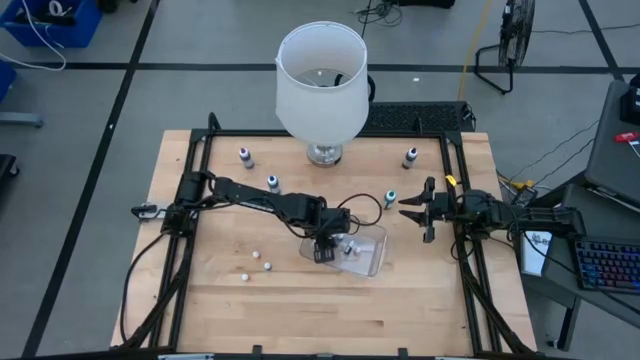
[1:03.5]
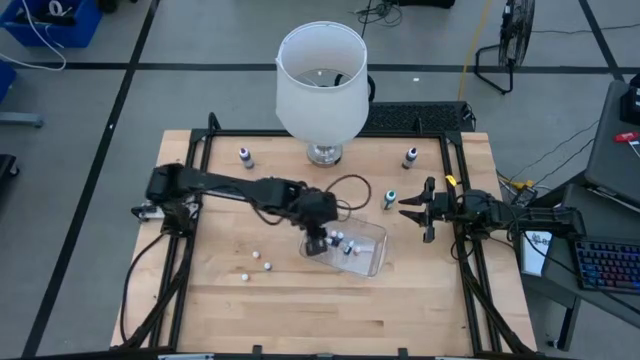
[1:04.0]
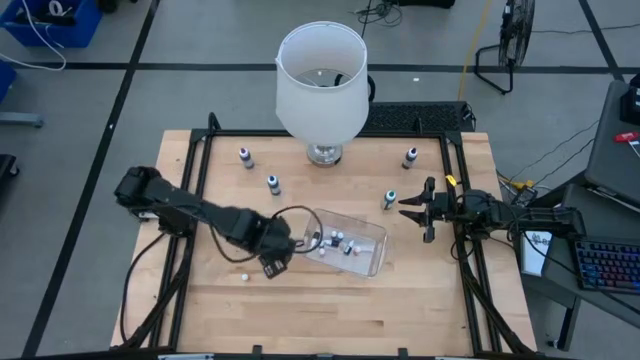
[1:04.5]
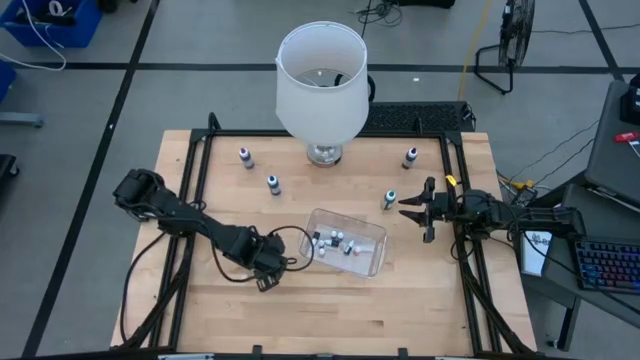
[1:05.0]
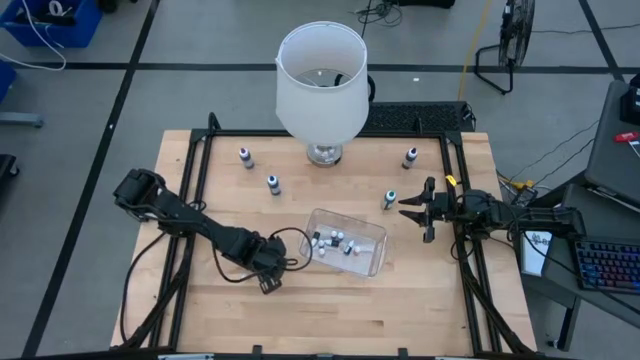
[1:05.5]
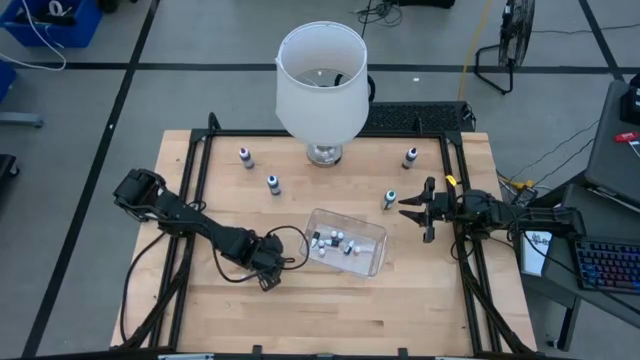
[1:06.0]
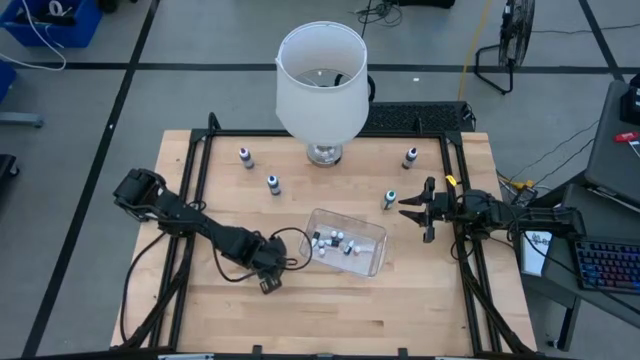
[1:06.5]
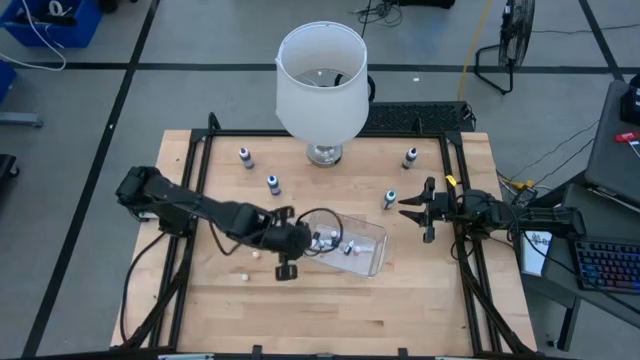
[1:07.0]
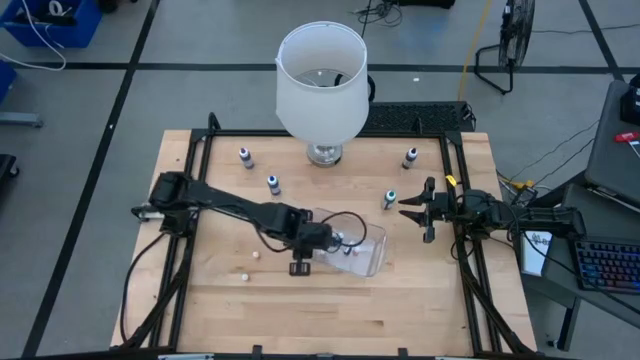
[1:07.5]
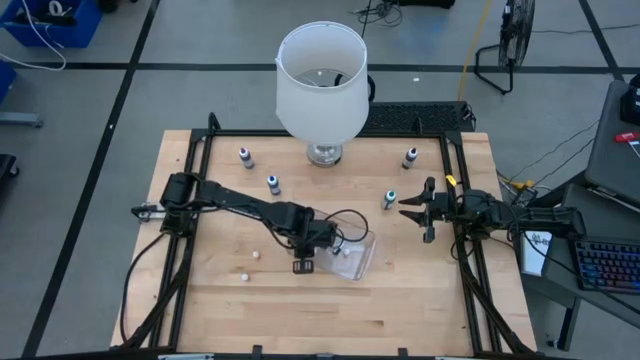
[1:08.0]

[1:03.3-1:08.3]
Task: Pick & Place food coloring
Put the red food coloring bottle into the transparent bin

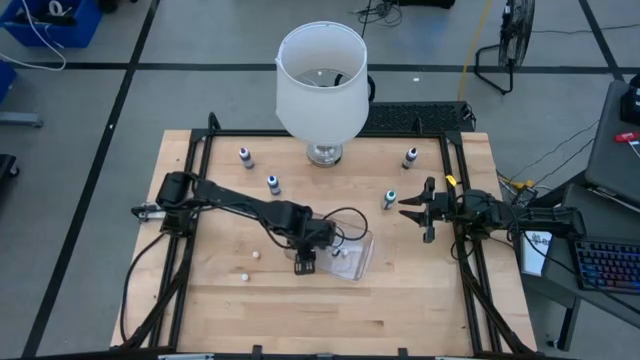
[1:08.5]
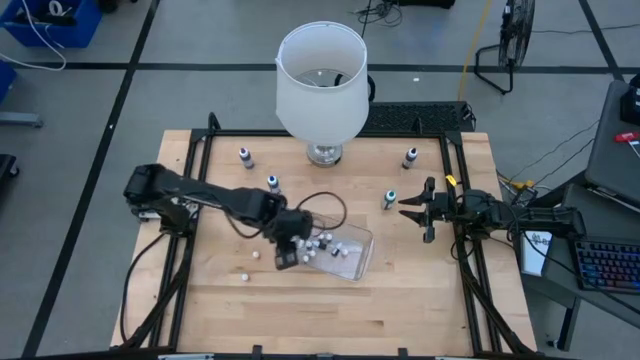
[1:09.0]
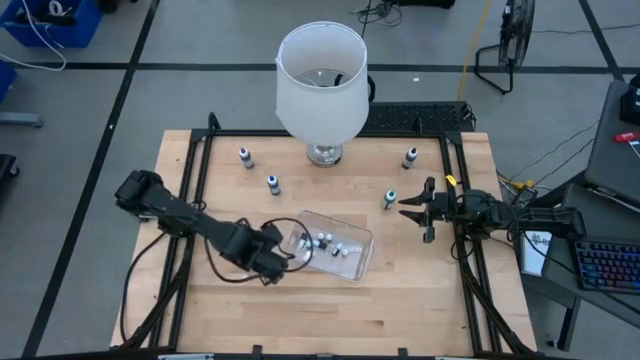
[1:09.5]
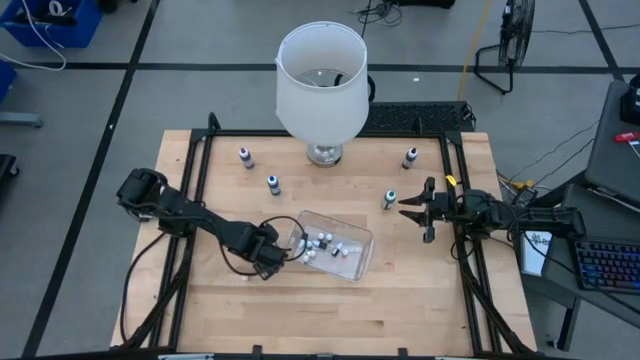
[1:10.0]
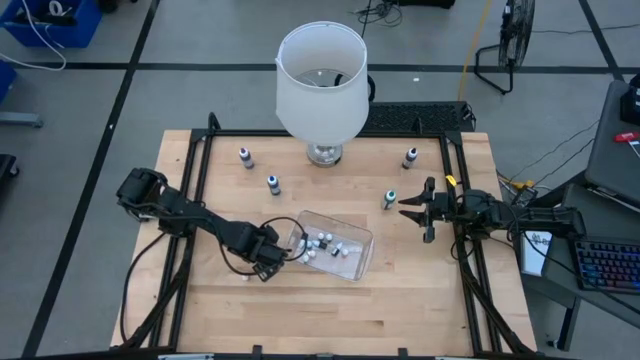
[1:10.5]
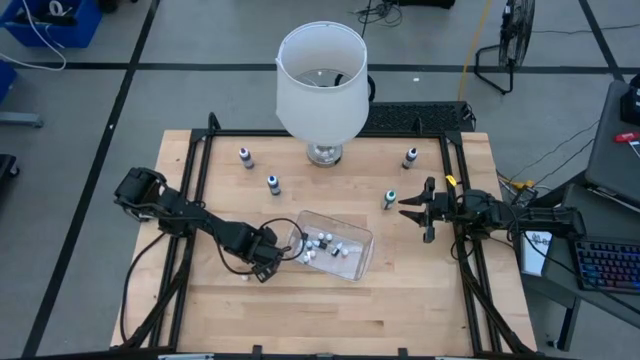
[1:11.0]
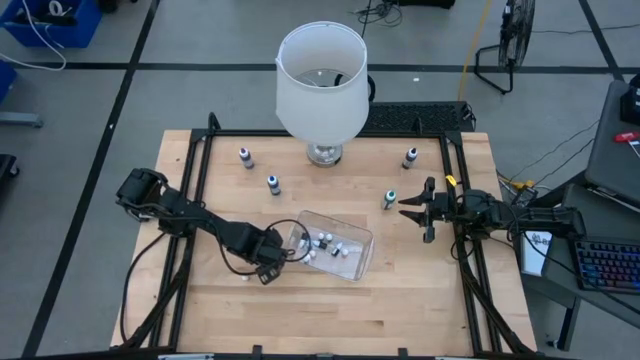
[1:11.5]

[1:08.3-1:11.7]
Put the yellow food coloring bottle into the transparent bin

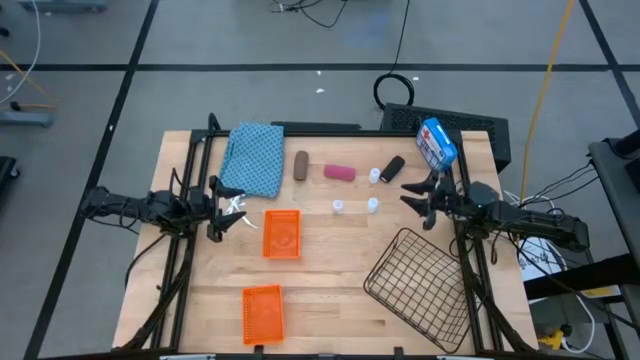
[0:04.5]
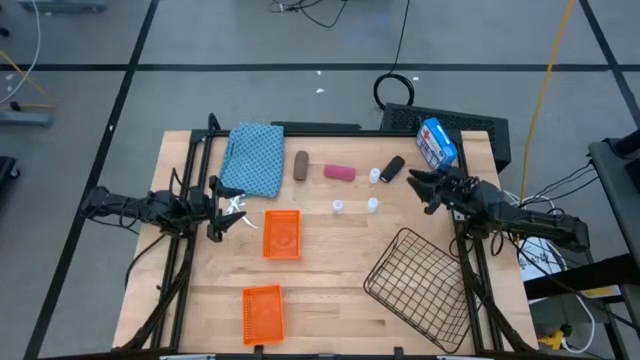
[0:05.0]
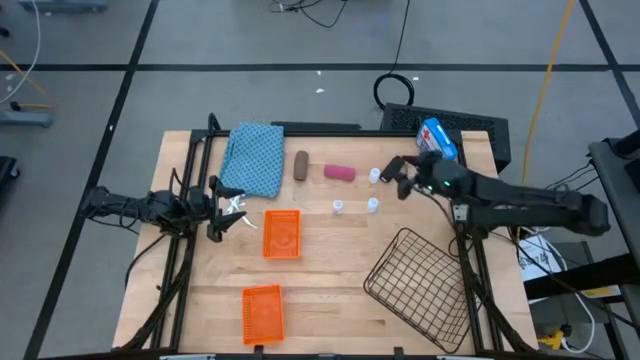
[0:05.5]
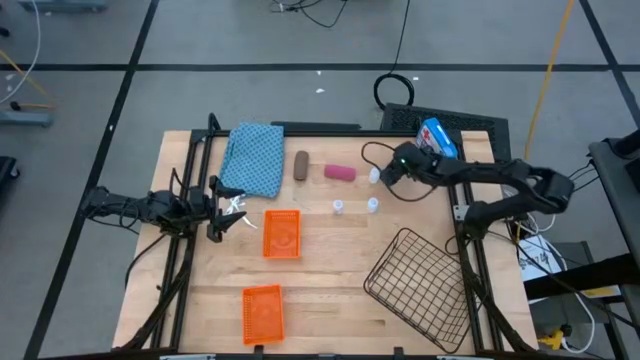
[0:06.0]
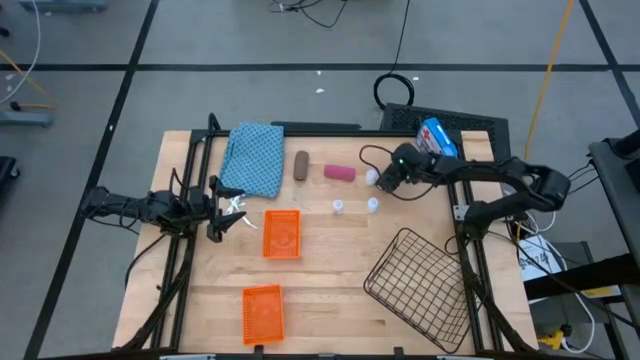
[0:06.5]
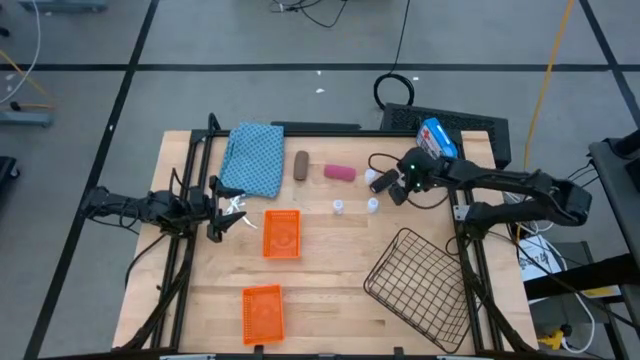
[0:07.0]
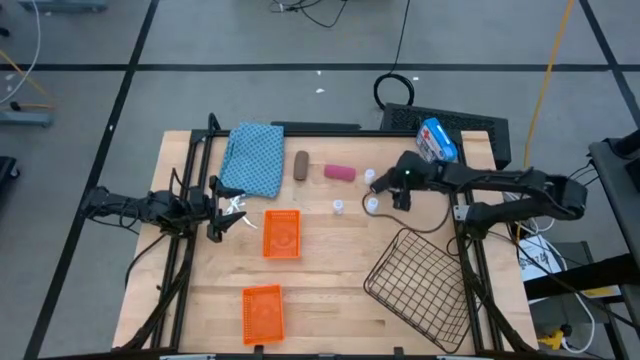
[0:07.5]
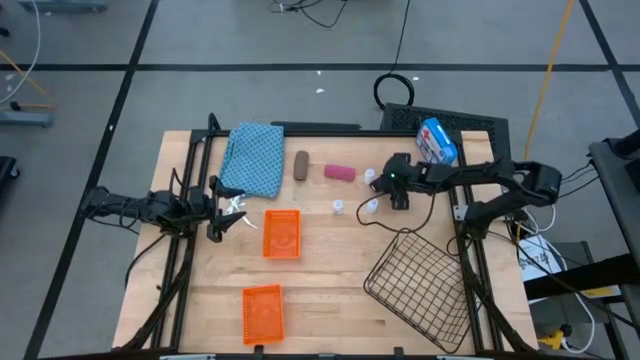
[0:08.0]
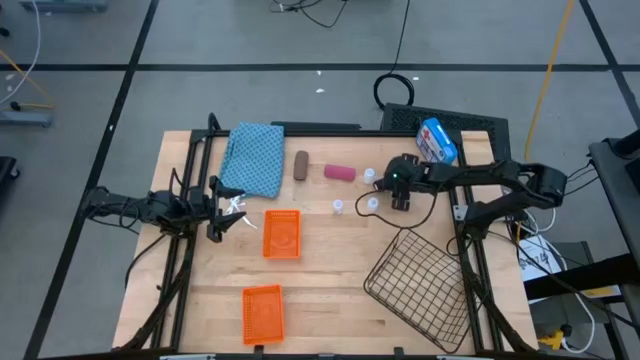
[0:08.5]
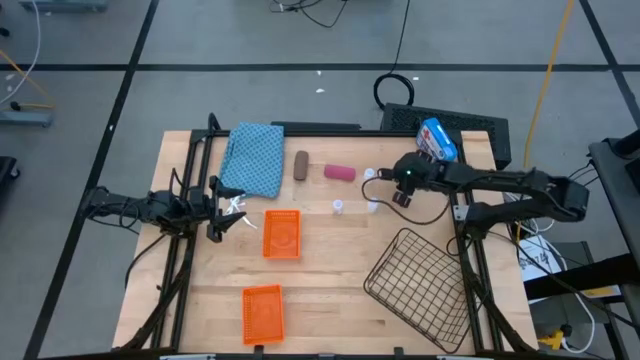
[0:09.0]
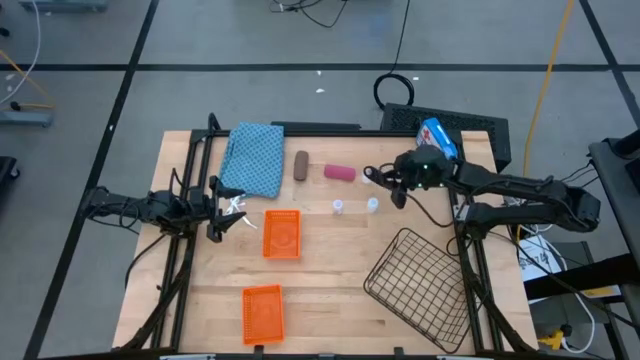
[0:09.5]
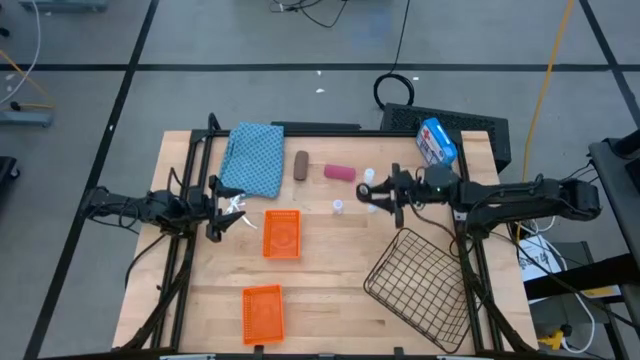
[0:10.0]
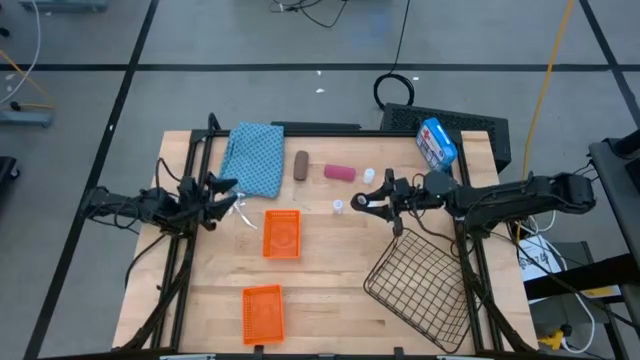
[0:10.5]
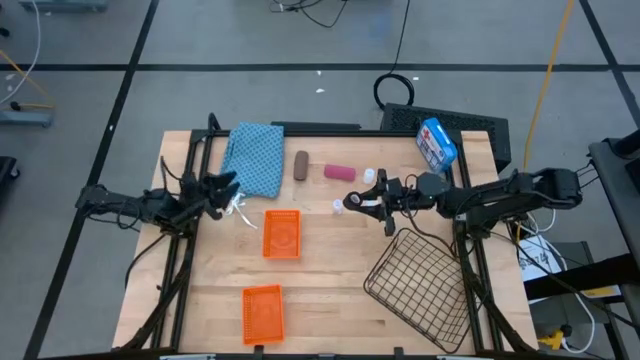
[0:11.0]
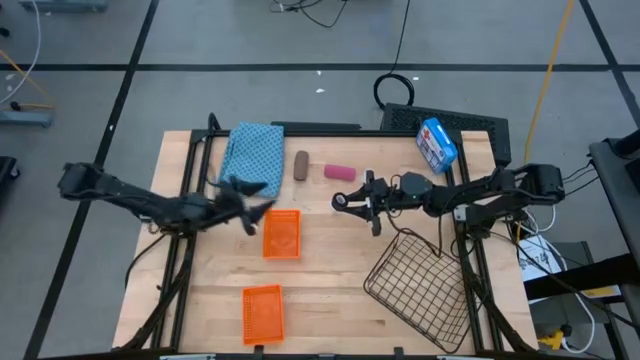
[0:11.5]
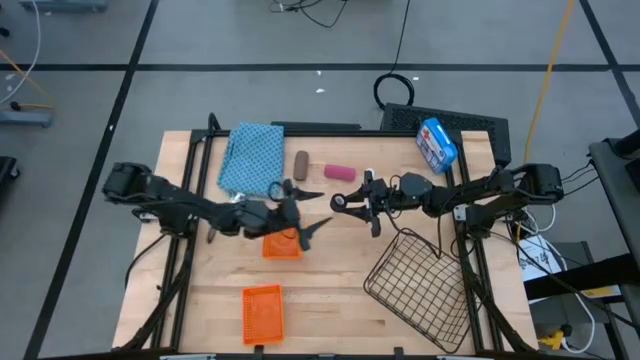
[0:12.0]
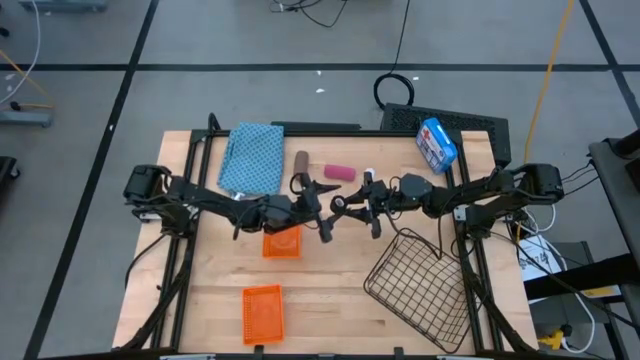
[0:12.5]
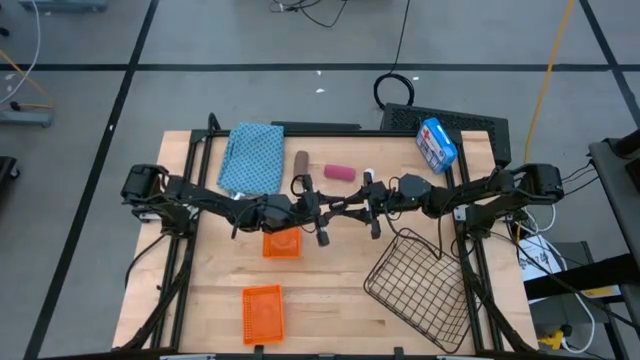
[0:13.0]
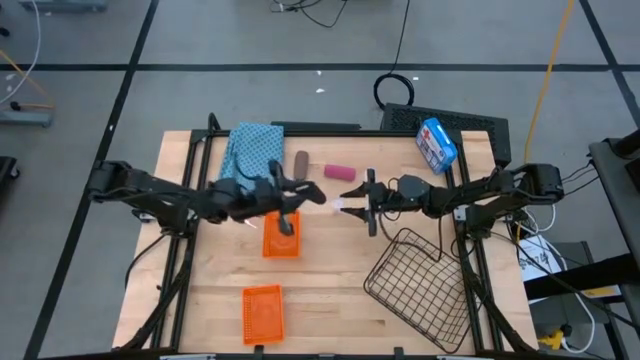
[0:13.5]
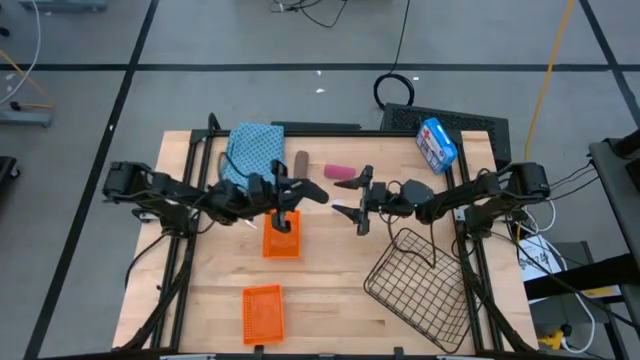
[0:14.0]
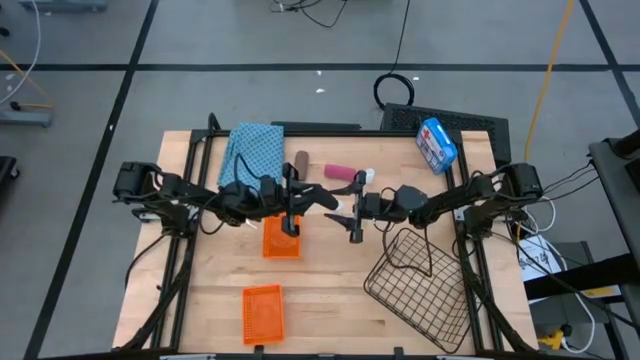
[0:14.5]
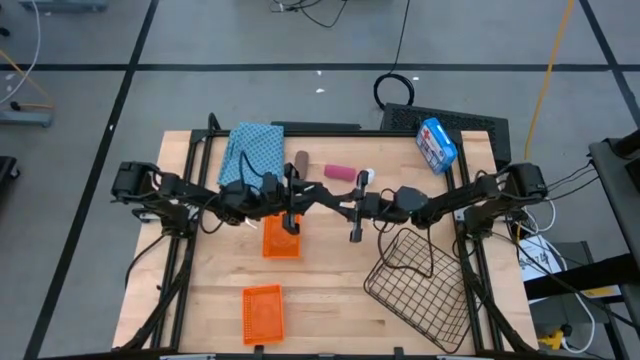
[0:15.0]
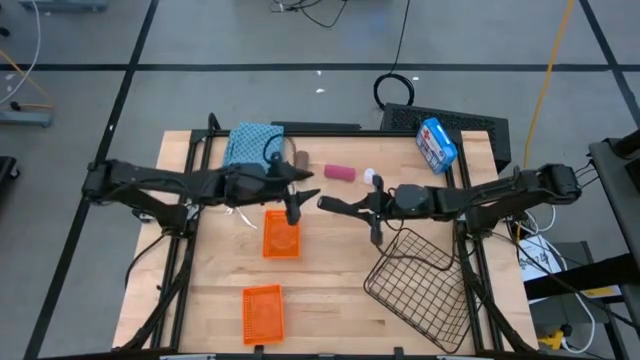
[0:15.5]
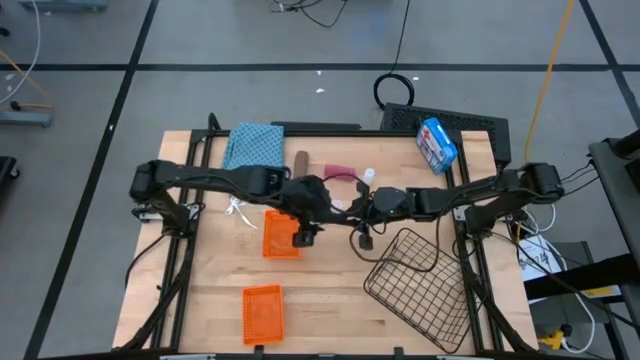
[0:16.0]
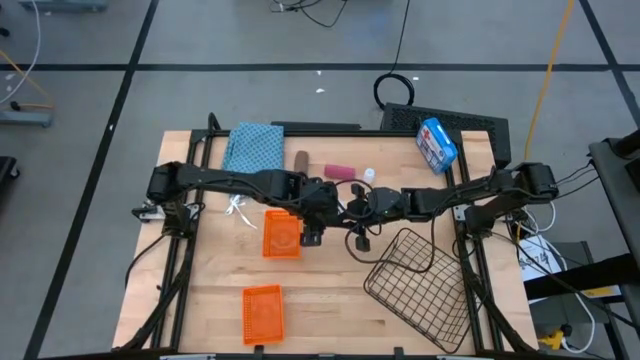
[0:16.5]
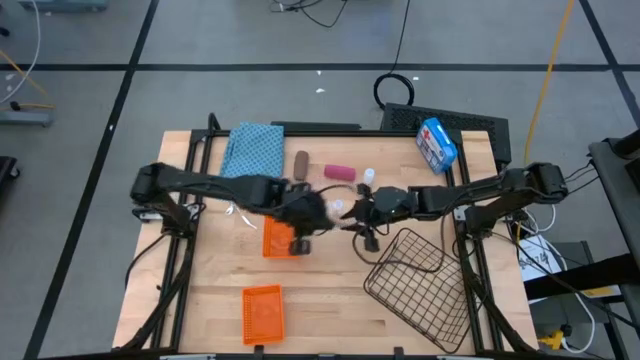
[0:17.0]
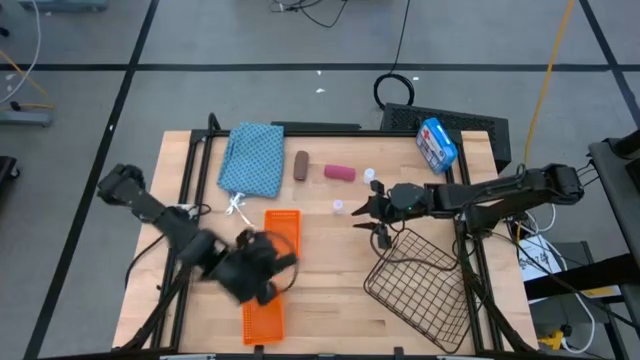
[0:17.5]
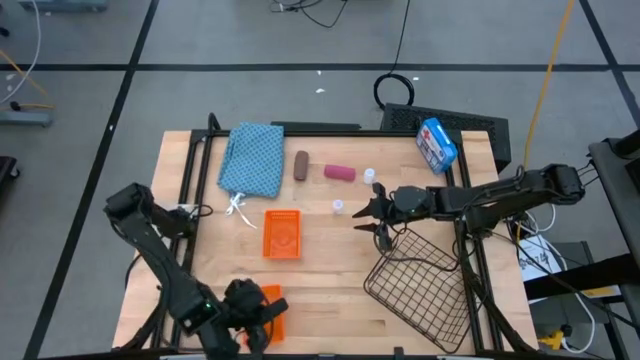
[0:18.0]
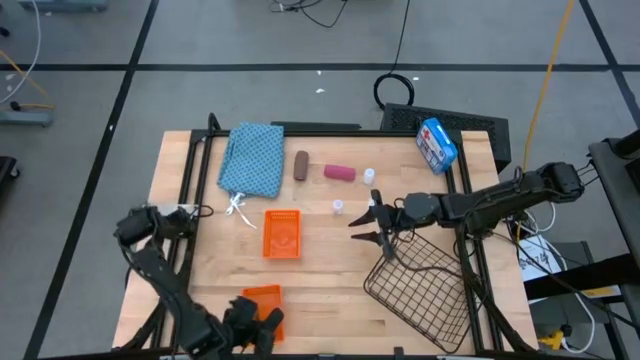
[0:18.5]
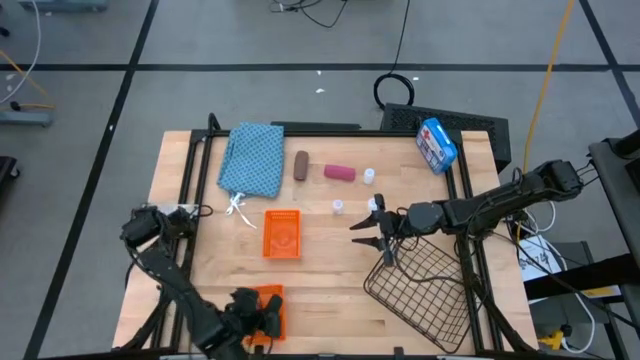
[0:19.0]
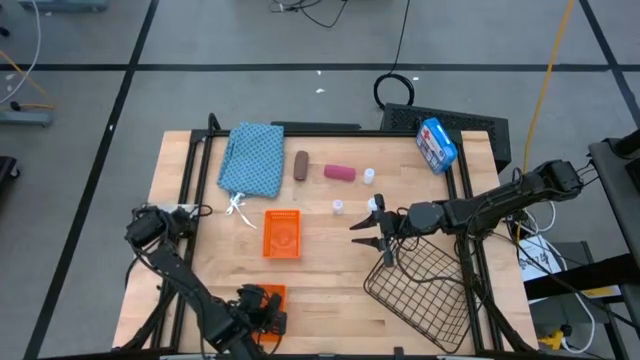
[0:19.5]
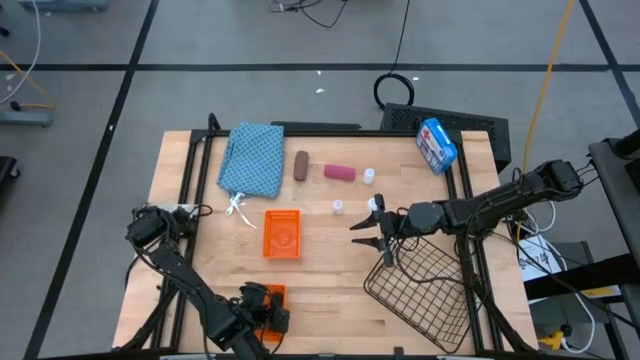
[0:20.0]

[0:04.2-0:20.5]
Task: Pick & Place Medicine items
Put the black bandage into the bottom orange basket
